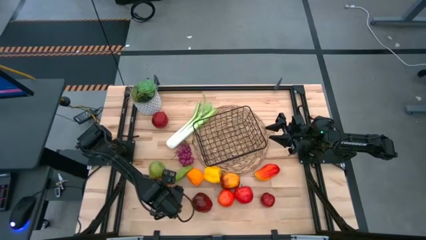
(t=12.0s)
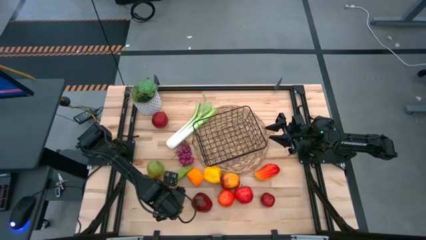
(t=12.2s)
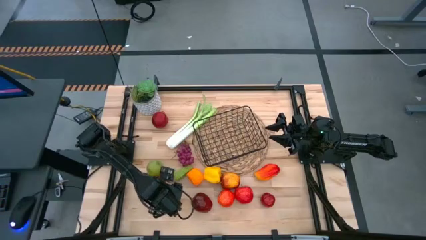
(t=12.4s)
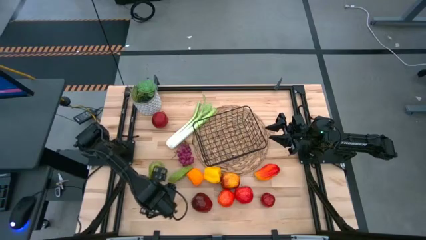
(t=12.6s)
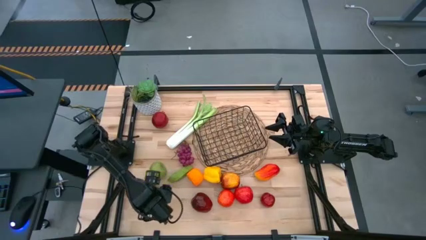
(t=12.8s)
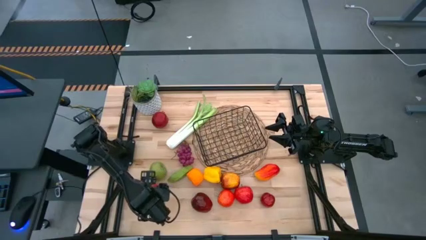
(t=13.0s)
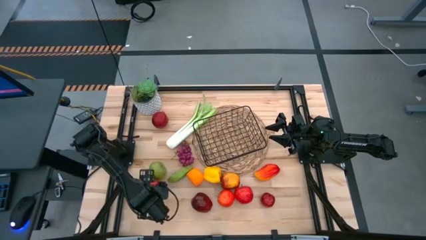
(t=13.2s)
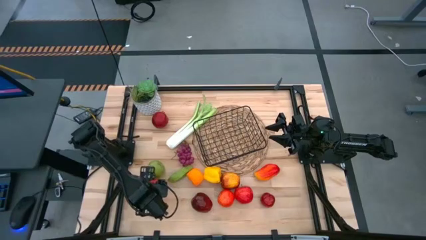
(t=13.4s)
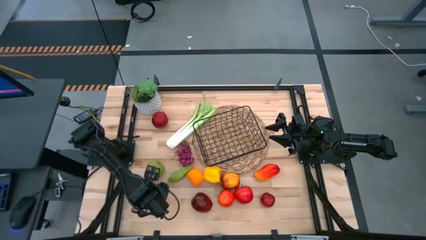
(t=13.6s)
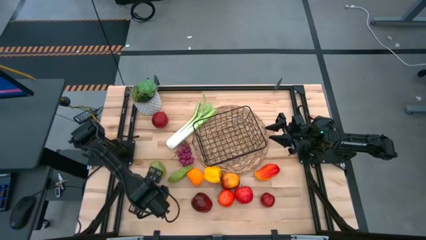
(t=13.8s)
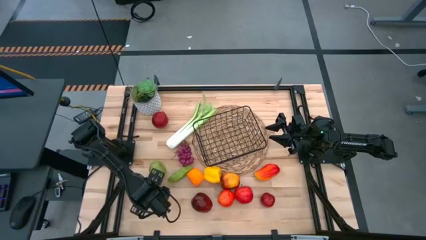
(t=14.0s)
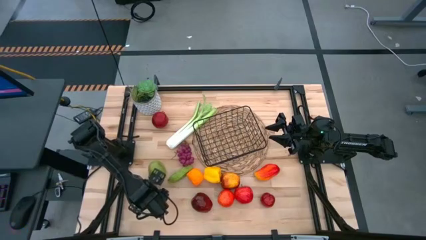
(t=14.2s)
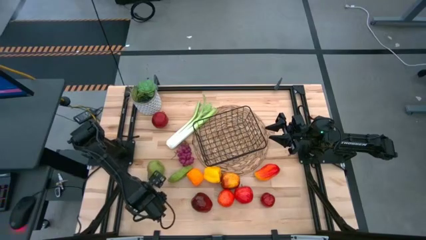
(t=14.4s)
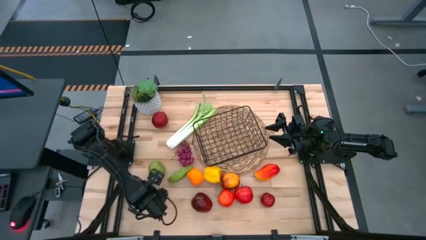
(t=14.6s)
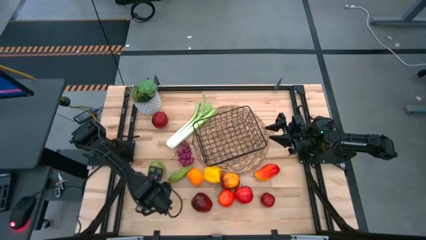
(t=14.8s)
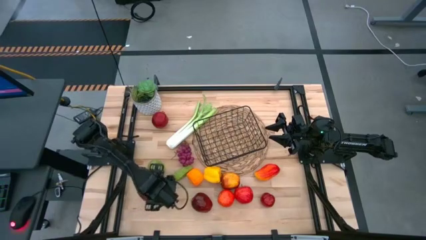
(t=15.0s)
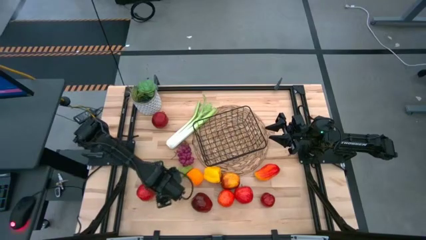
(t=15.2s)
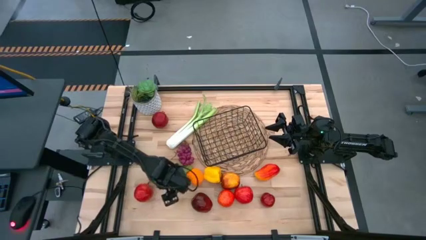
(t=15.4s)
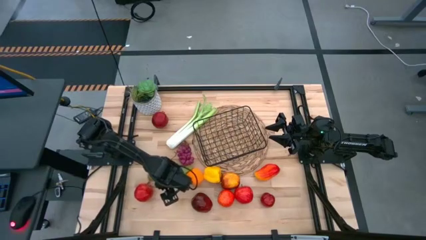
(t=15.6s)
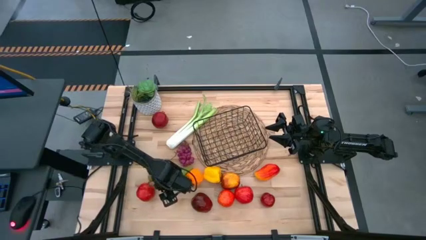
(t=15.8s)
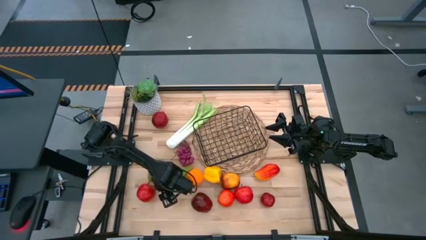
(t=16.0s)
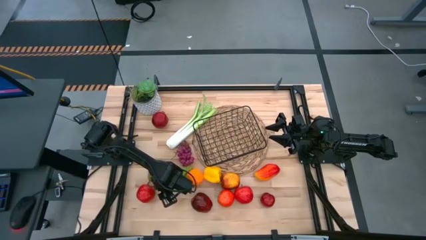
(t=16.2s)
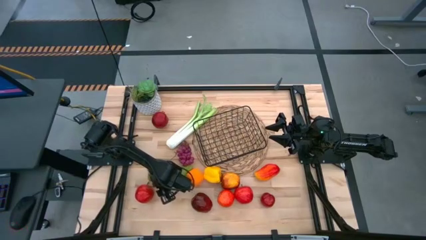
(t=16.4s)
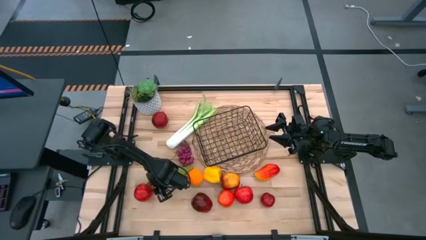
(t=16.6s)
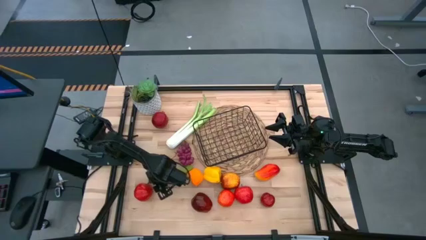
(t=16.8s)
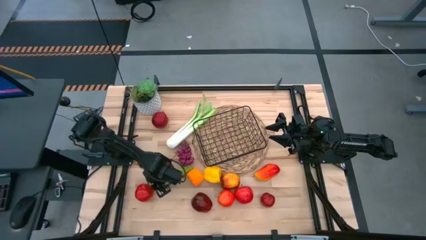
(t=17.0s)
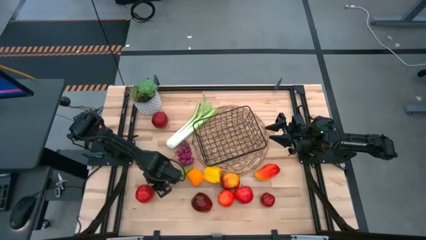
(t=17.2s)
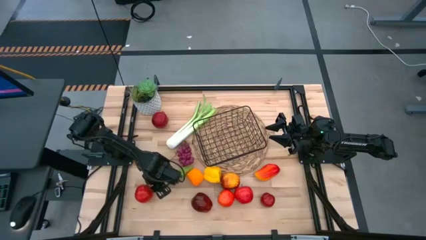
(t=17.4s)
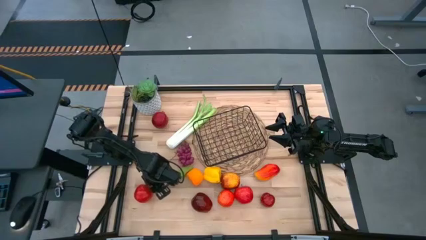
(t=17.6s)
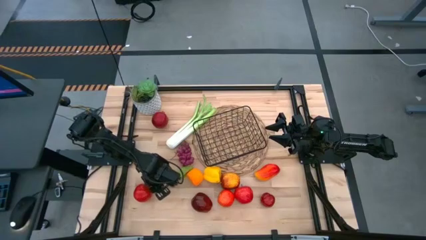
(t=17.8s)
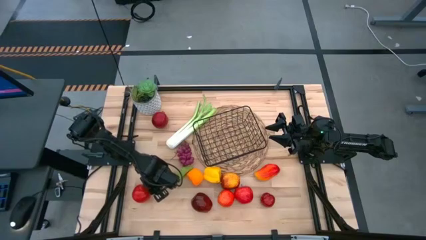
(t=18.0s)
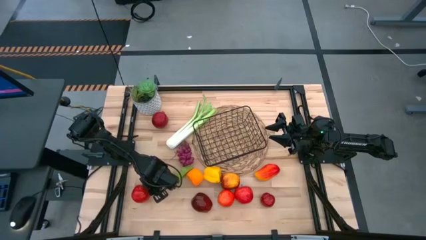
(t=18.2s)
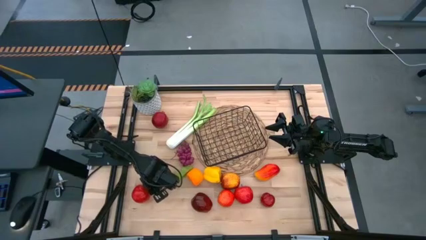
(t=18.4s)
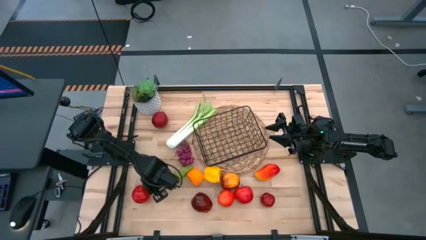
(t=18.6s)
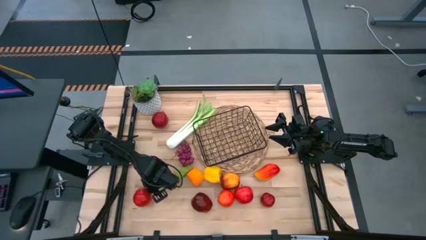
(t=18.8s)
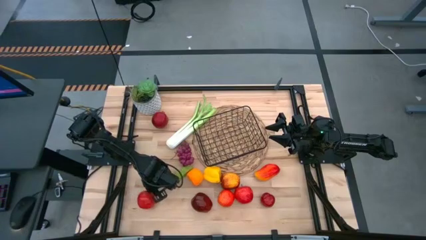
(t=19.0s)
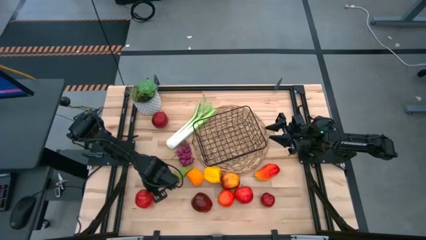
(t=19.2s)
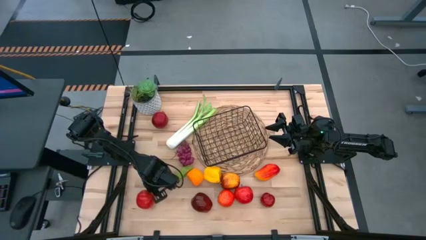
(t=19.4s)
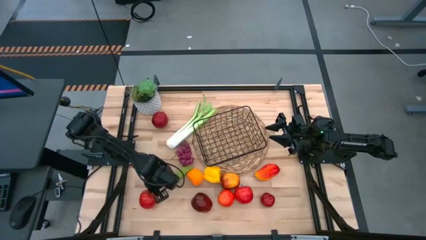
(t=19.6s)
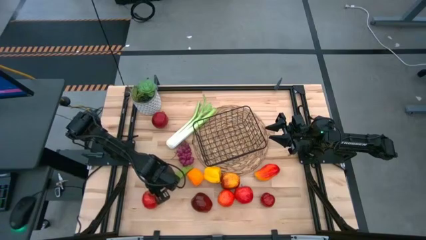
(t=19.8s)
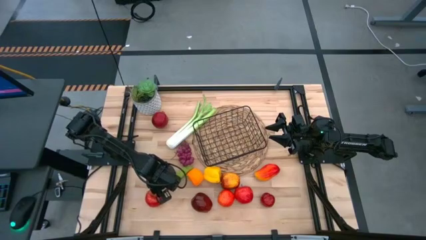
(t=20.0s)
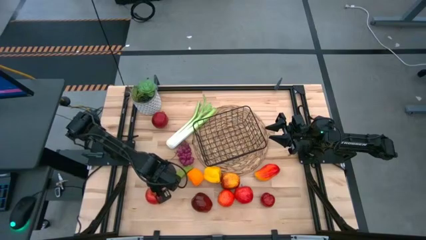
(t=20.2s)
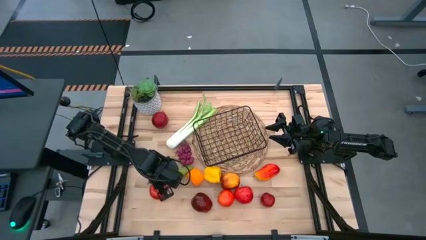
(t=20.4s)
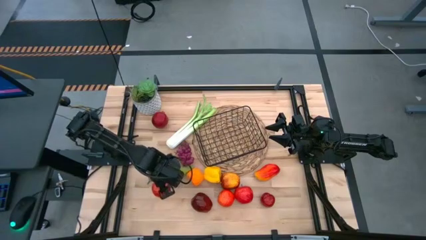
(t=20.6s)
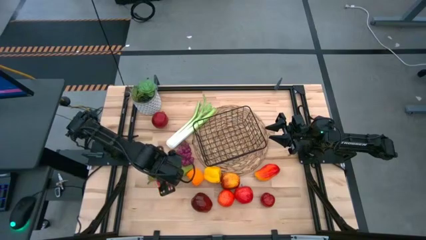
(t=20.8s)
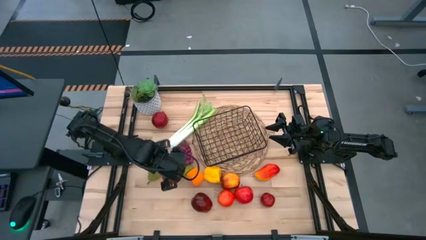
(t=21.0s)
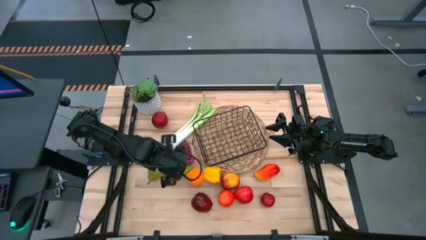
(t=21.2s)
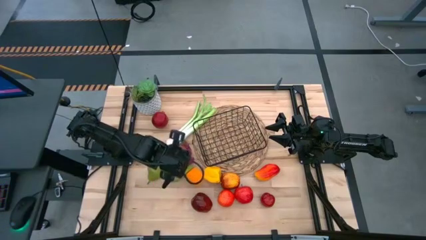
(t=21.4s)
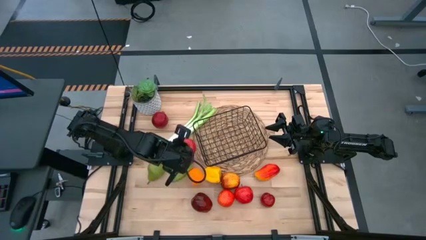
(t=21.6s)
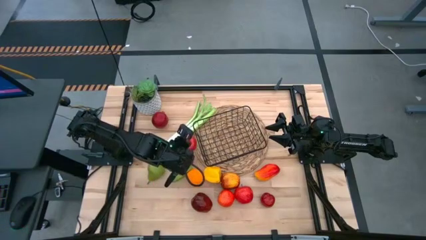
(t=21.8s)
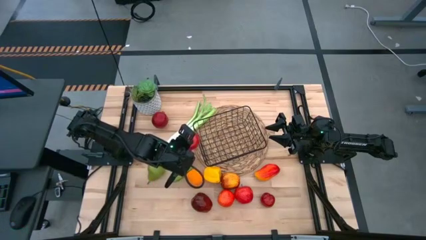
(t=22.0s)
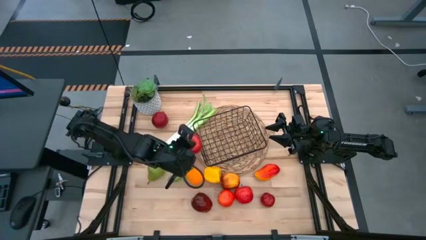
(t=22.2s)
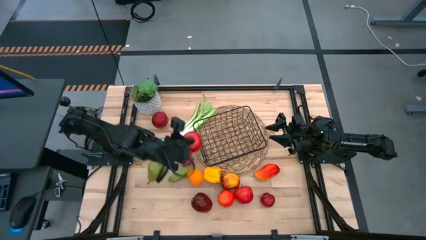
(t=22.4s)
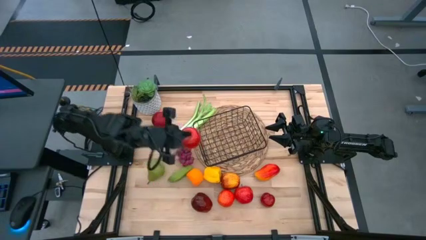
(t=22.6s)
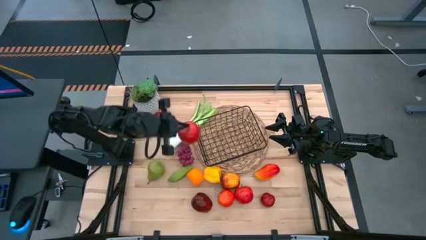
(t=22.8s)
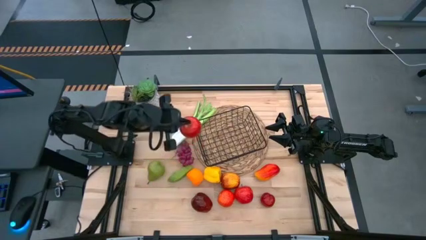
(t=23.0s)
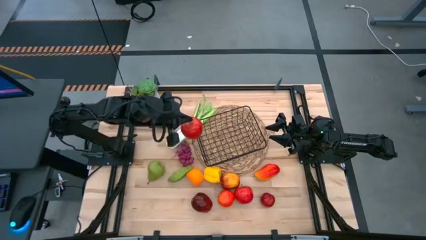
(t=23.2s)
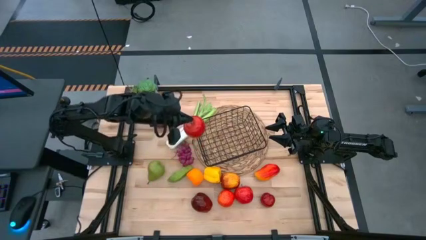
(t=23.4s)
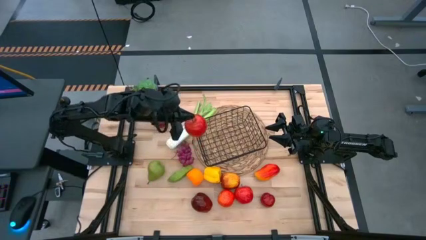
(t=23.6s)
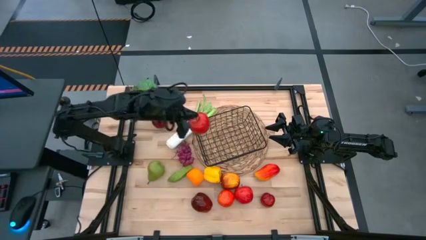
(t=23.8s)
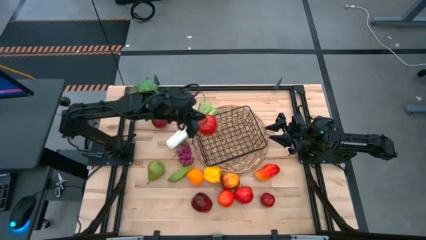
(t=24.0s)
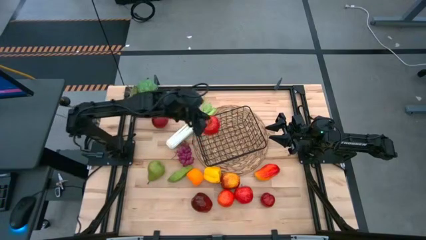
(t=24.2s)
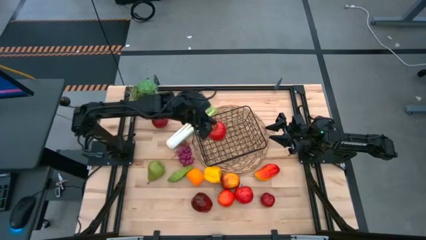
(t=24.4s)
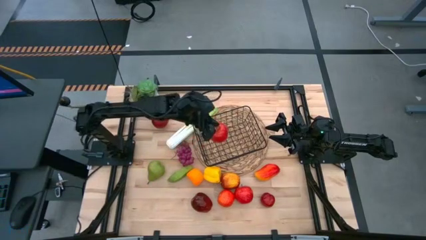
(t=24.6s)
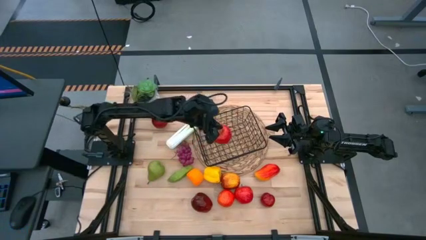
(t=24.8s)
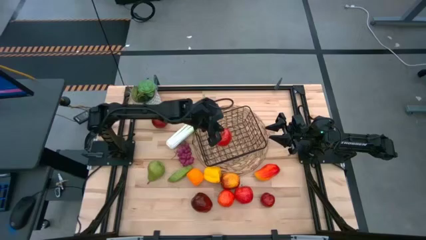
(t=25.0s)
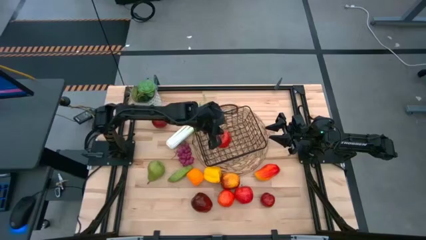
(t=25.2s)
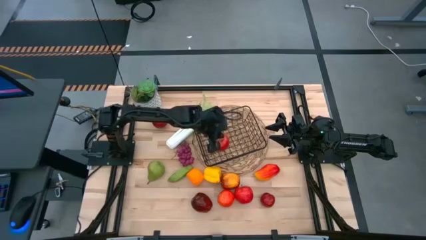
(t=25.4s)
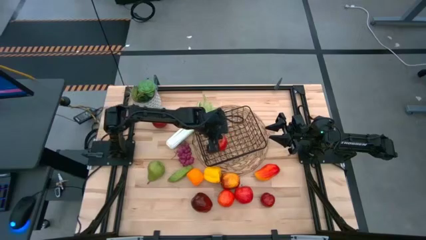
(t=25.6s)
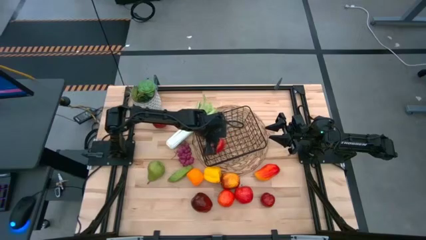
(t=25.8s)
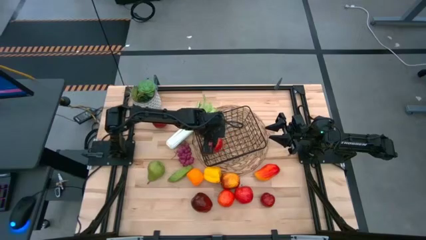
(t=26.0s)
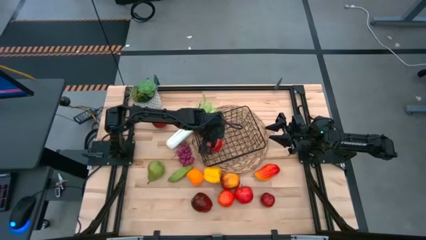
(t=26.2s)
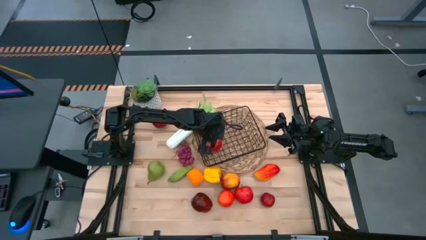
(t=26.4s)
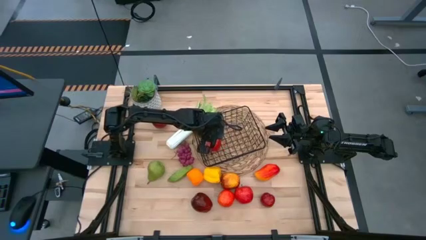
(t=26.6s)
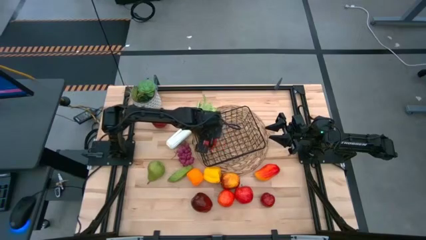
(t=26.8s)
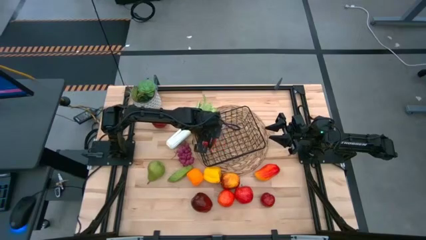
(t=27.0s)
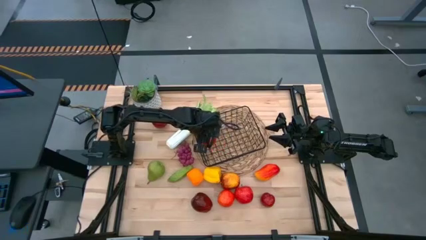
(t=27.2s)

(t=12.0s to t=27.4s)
Task: Build produce basket
Put the red apple into the black wire basket
